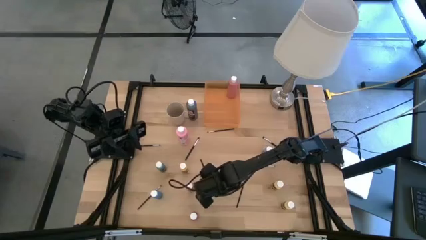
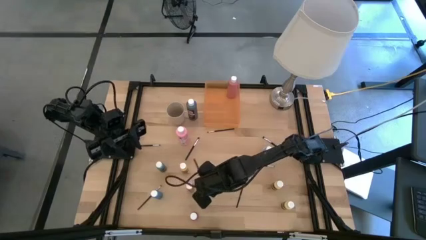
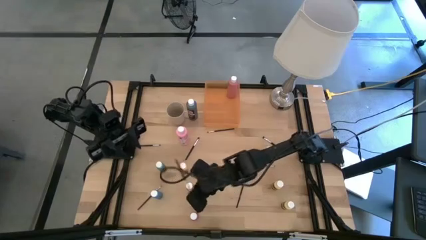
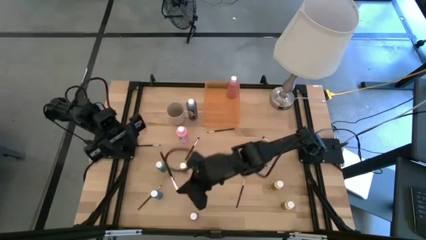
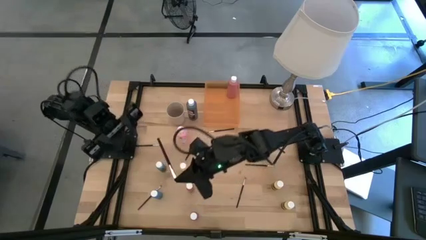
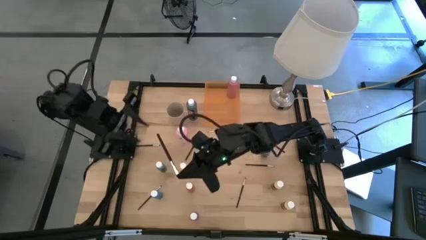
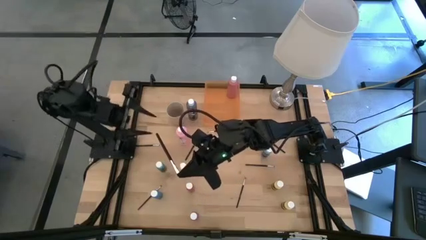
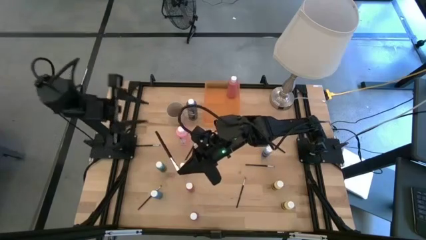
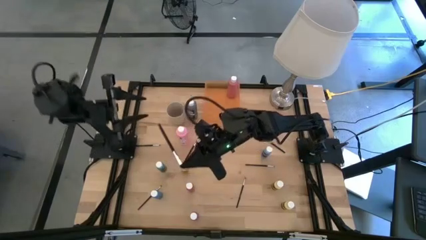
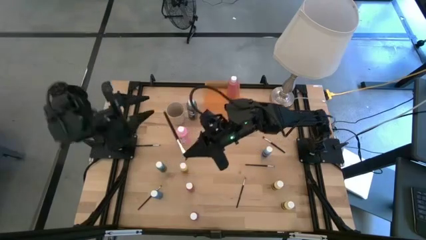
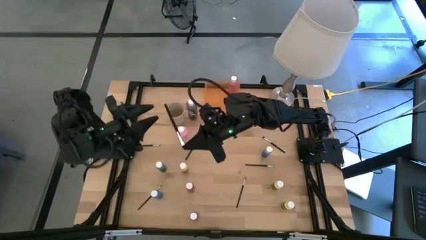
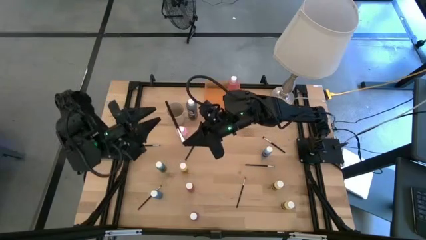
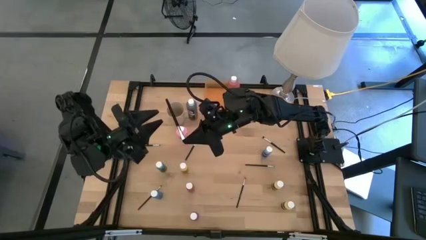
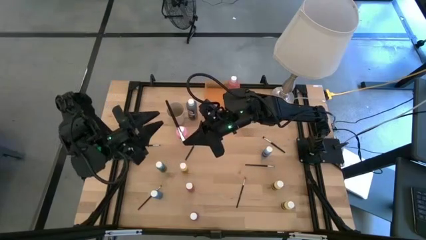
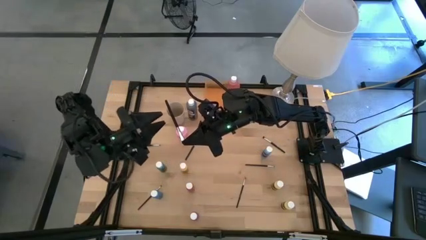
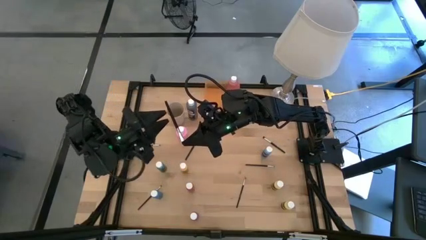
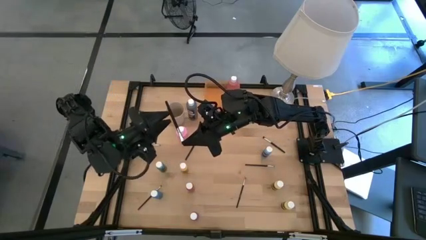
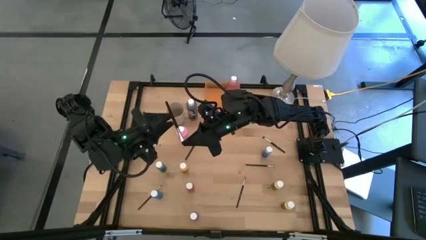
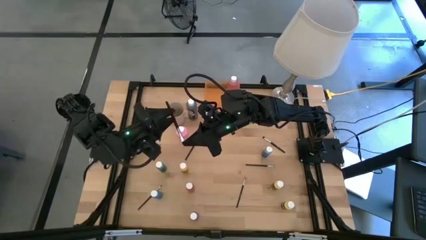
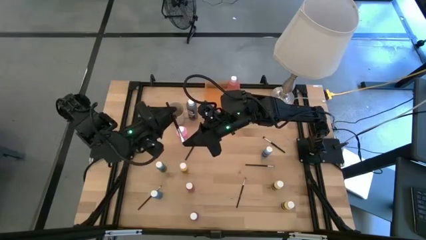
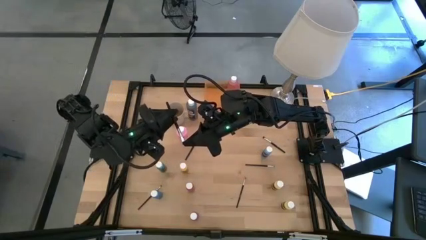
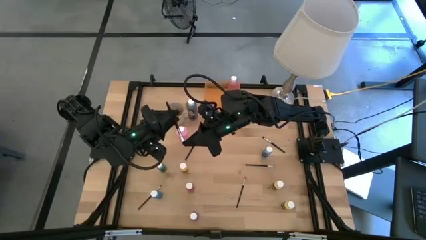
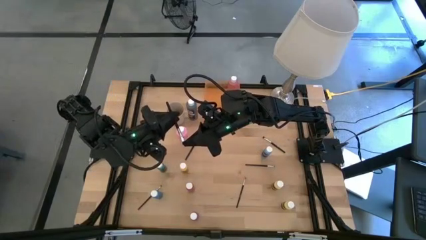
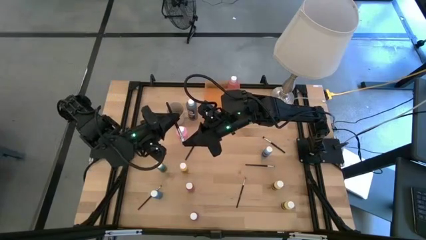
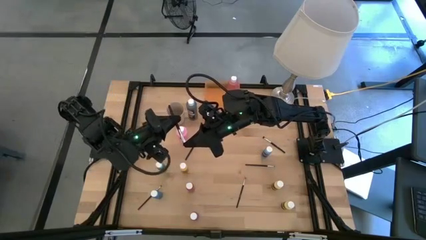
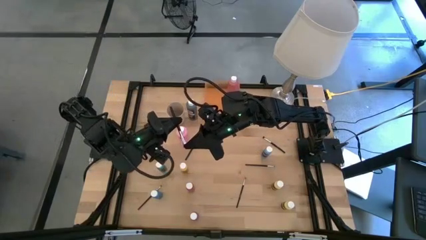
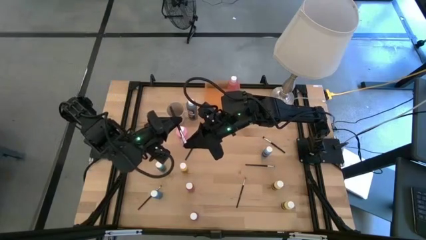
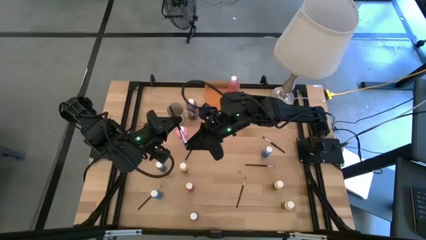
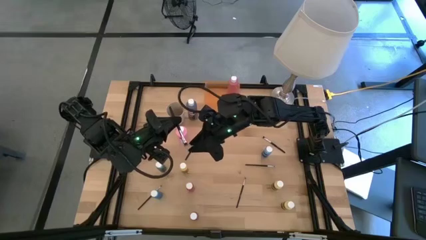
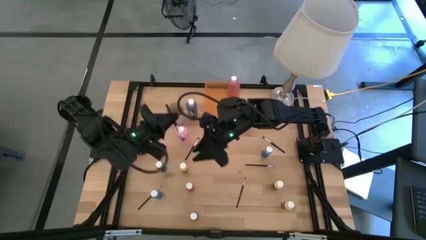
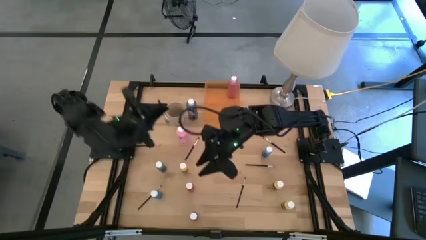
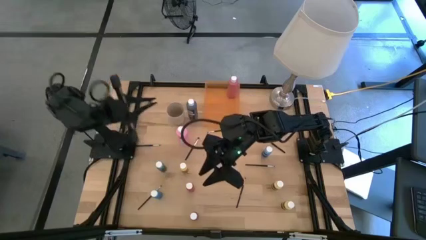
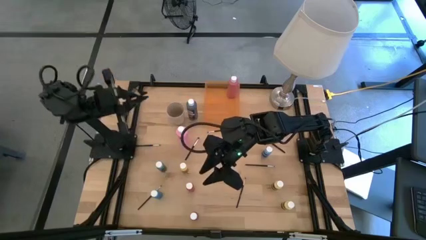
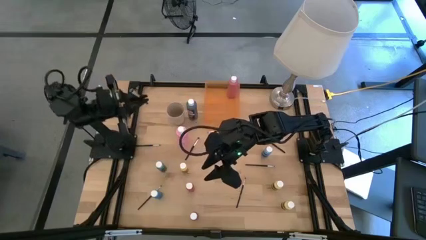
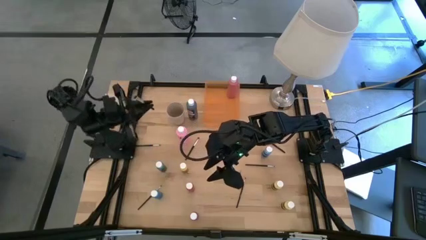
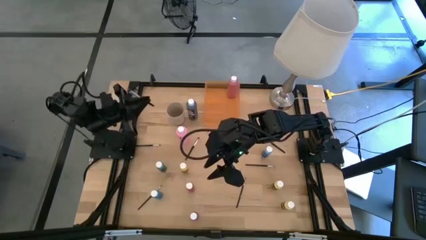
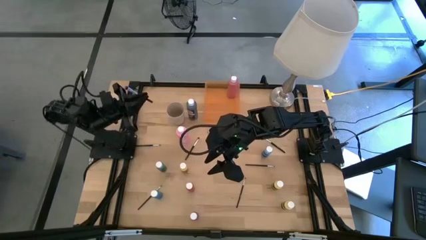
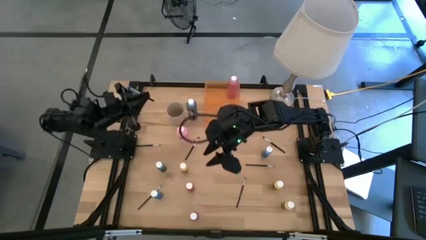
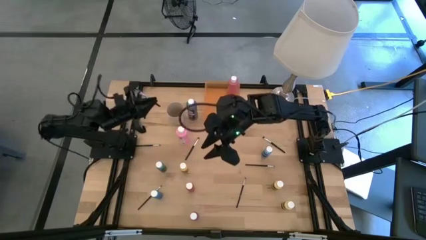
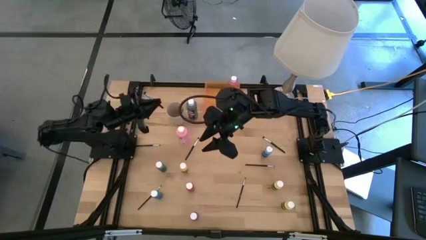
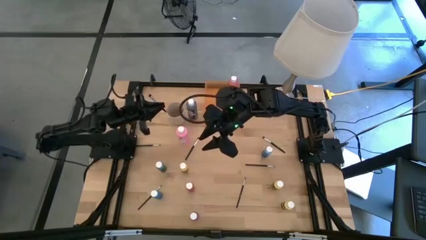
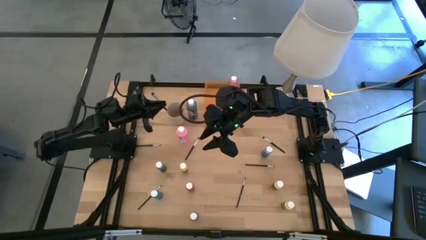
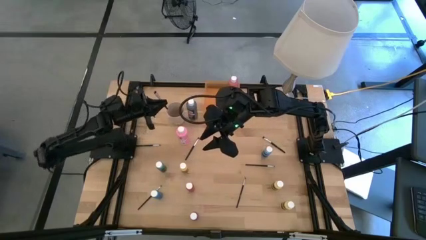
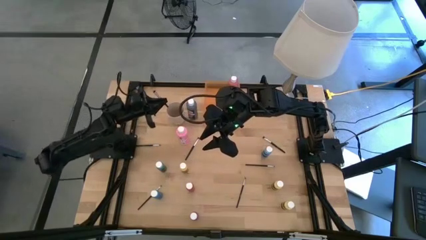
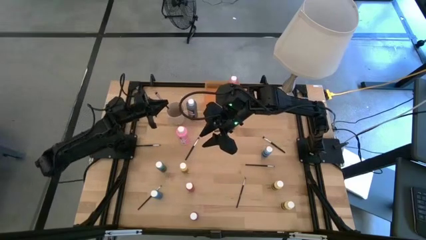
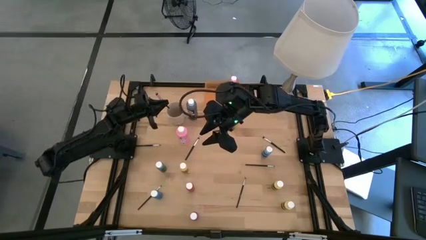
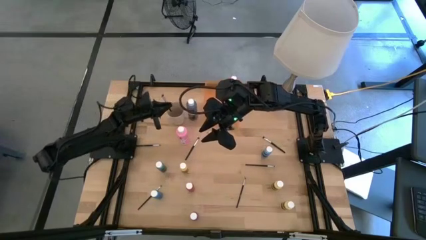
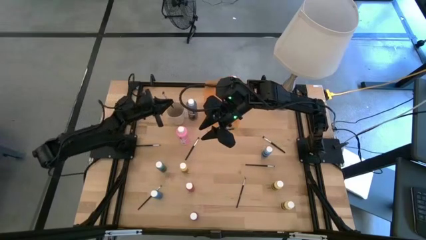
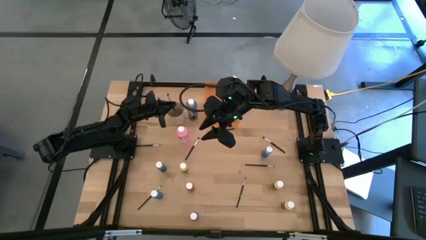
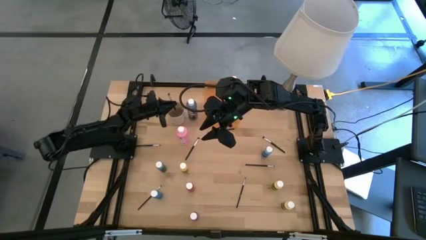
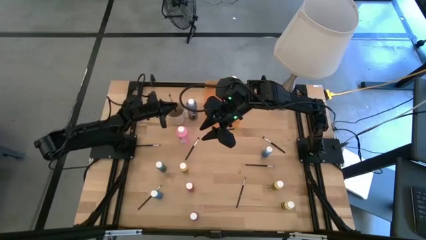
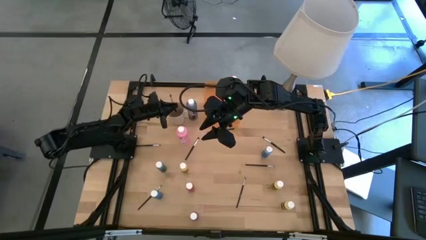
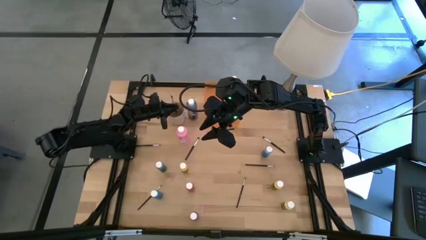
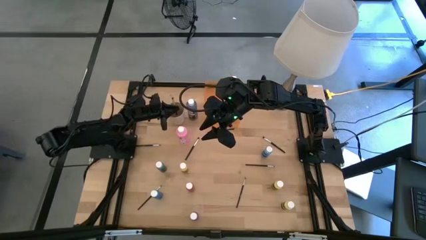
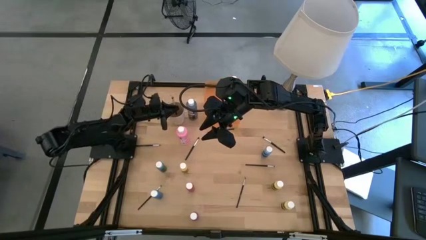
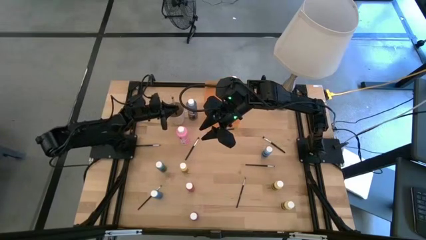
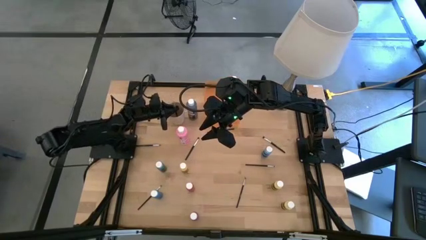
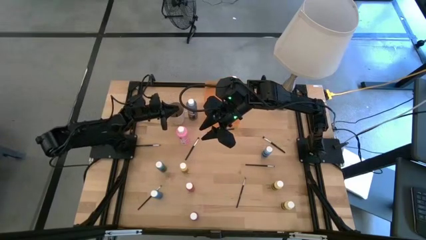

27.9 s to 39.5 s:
Task: Pick & Place Paint Supplies
Put the black paint brush into the white cup

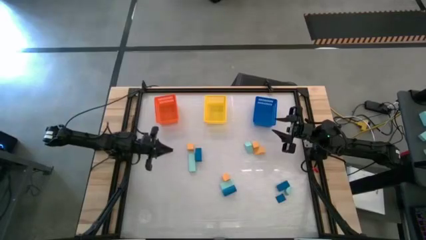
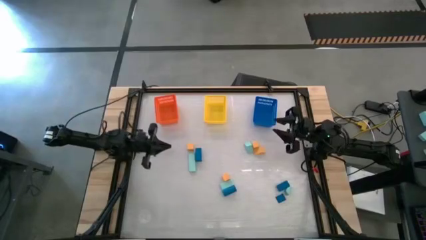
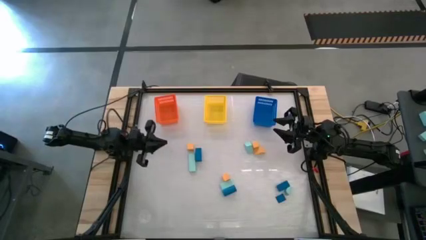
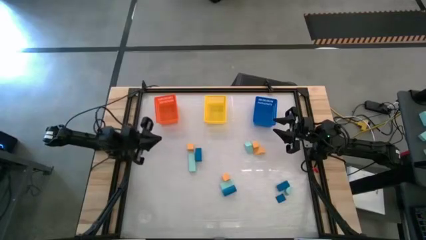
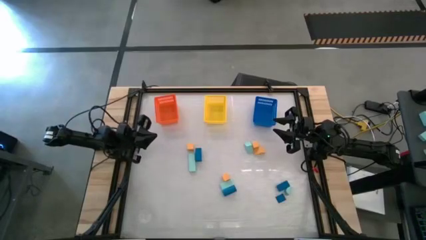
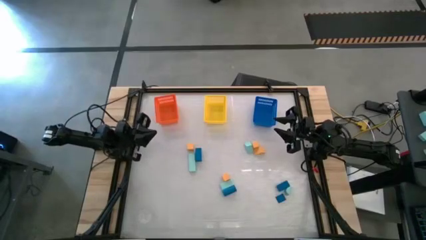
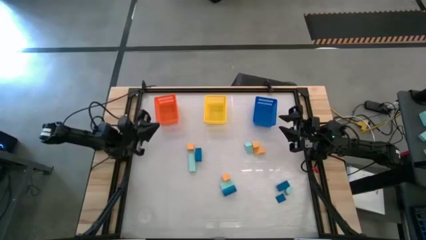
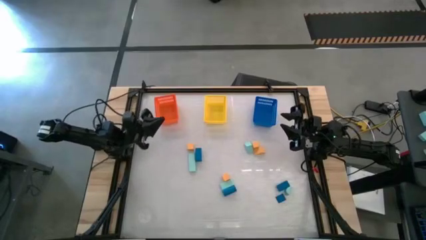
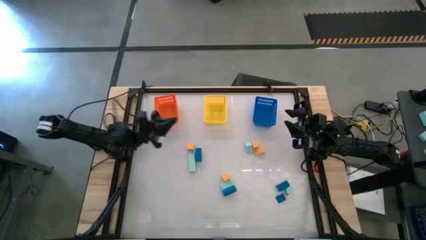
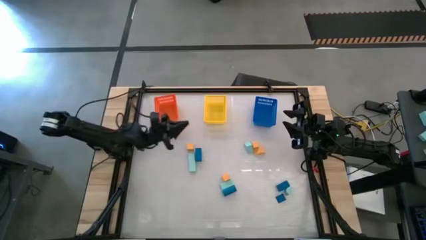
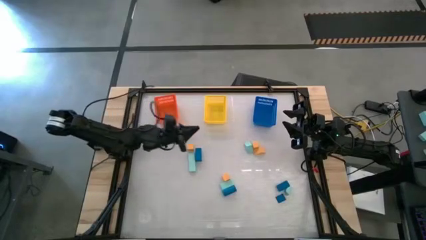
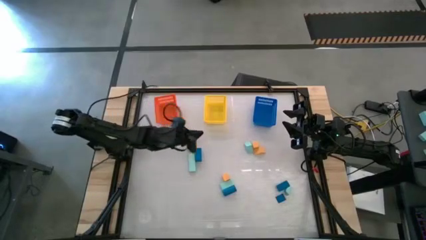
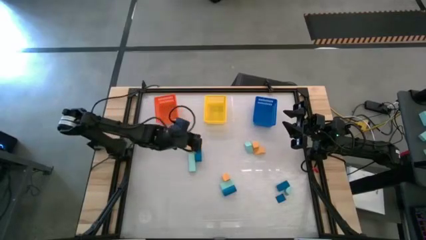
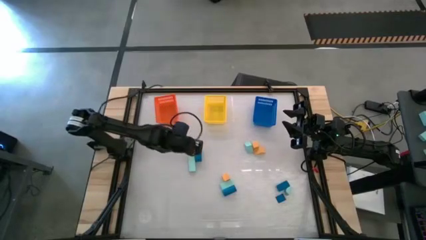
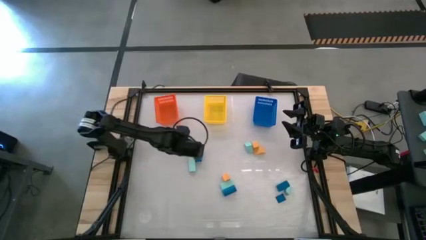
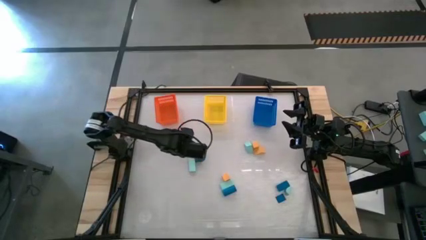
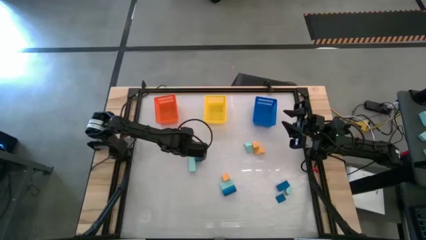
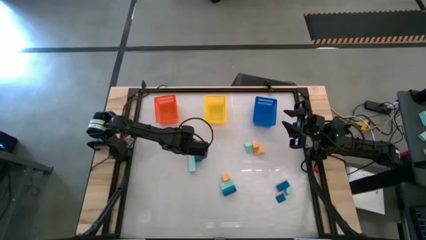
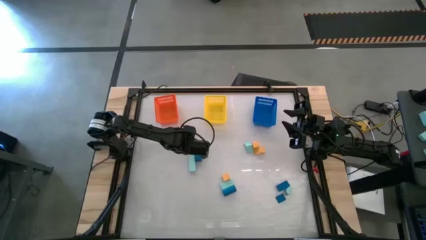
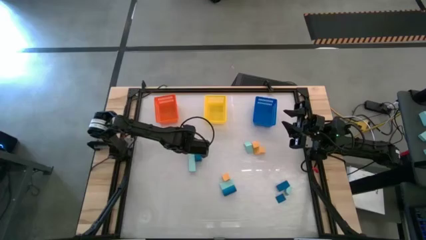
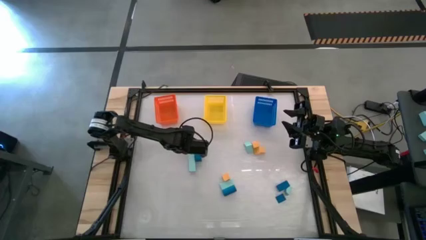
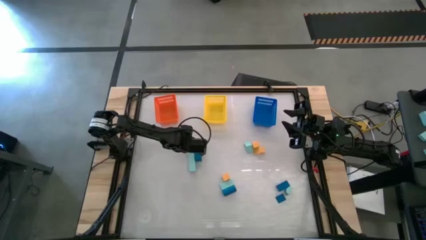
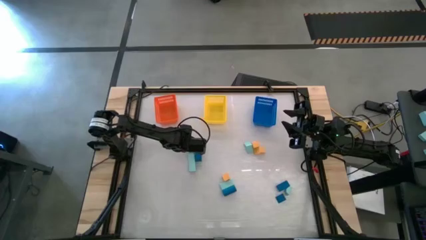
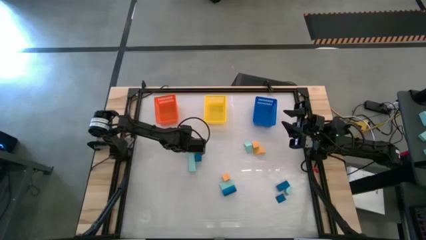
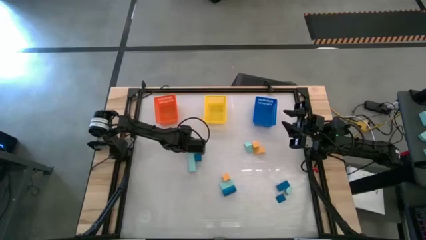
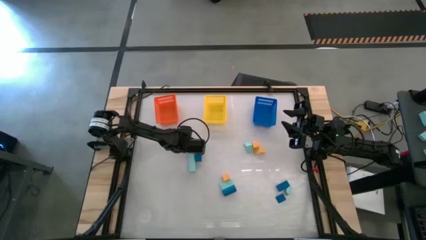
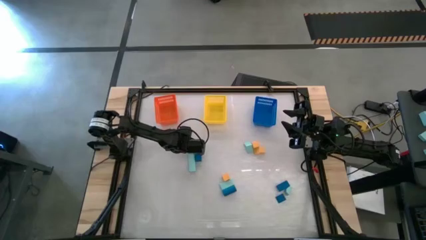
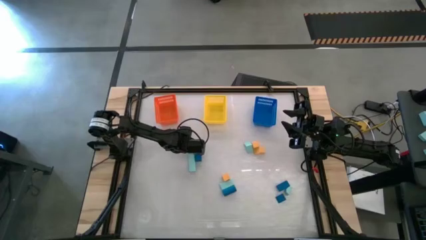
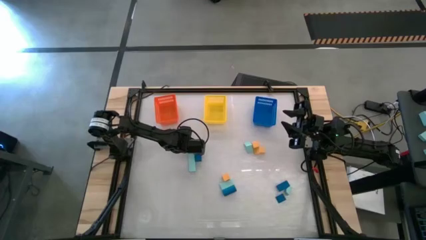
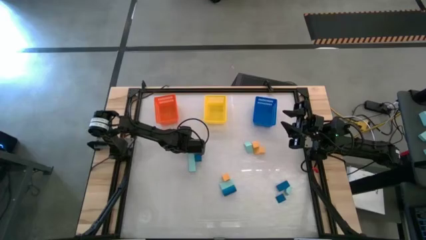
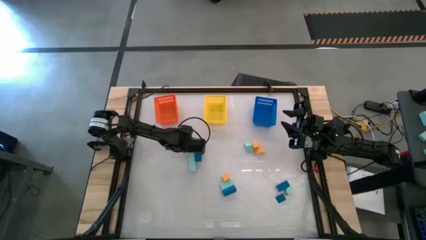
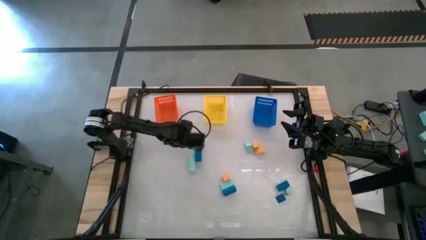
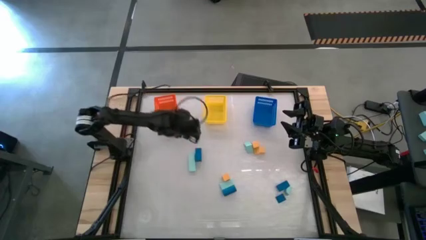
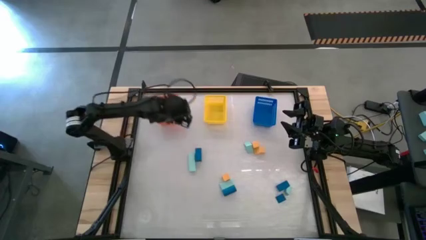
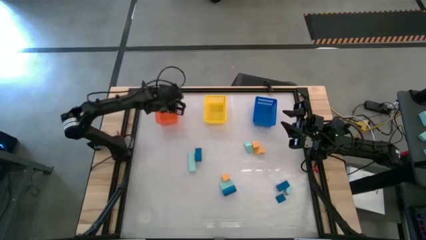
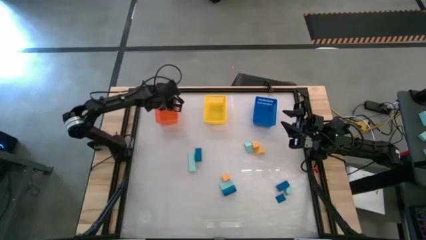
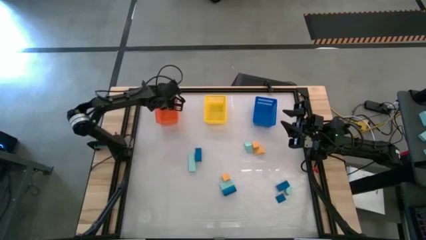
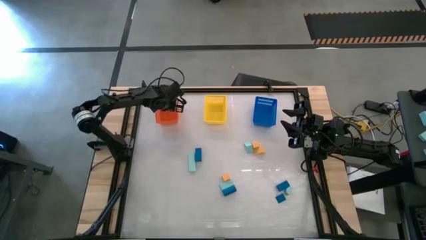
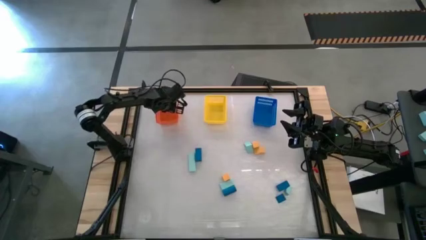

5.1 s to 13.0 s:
Task: Sort & place blocks by color
Put the yellow block into the orange bin
